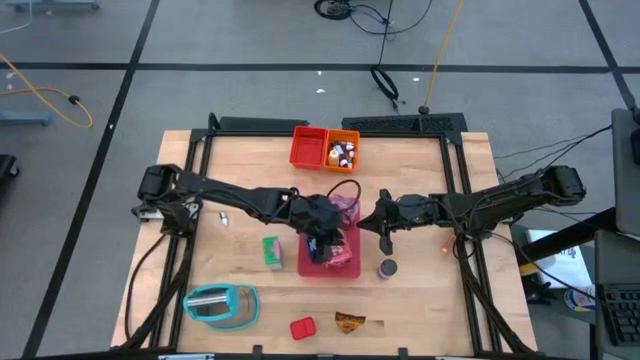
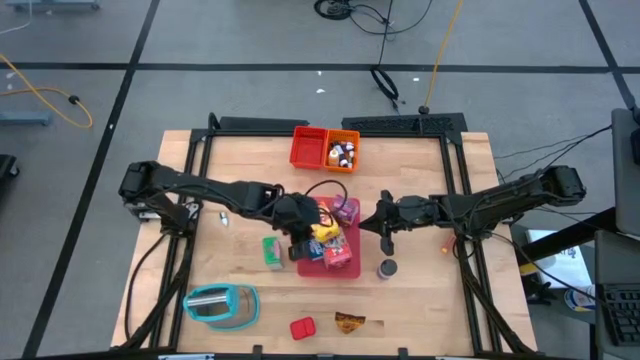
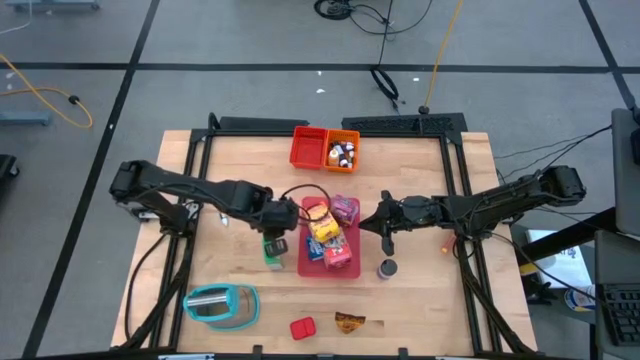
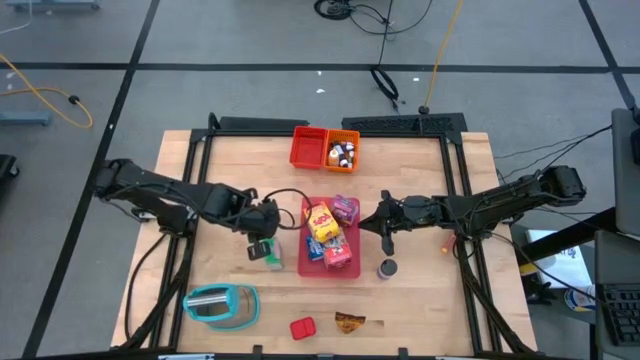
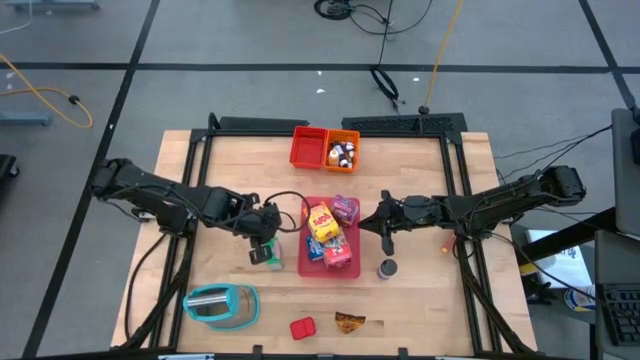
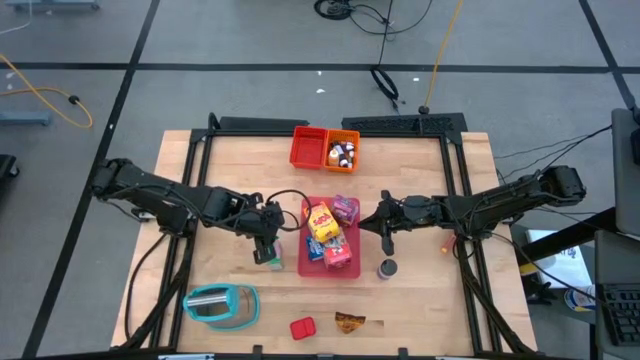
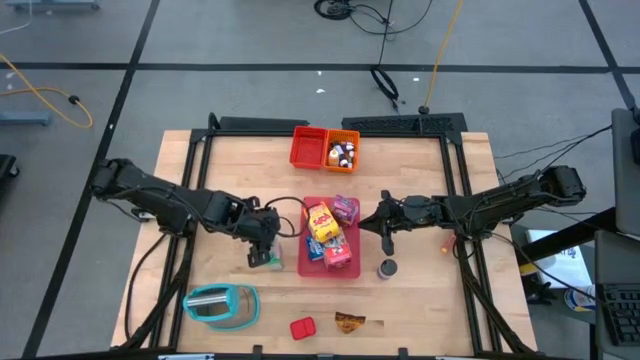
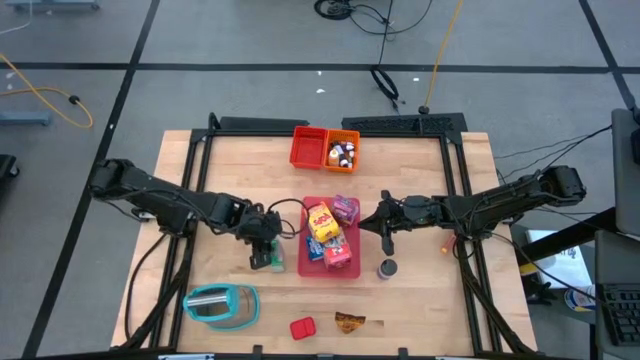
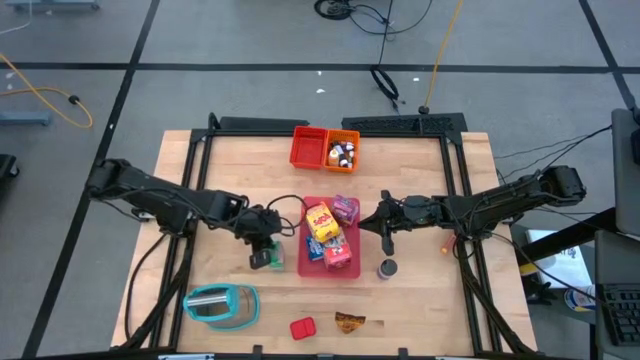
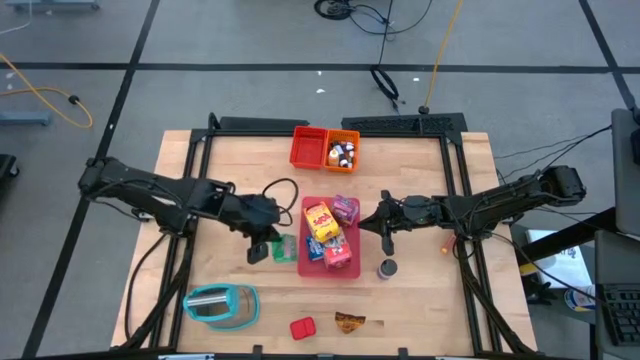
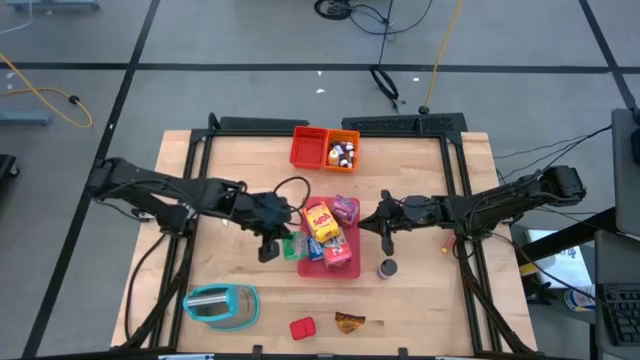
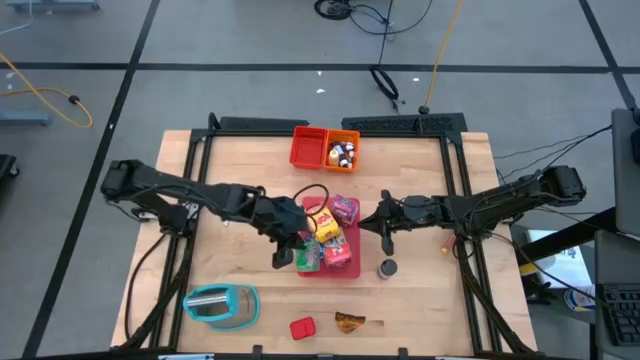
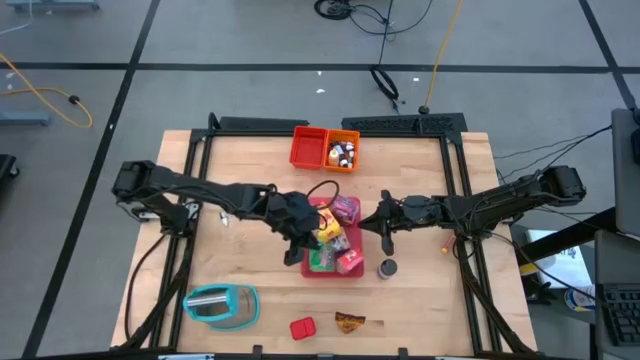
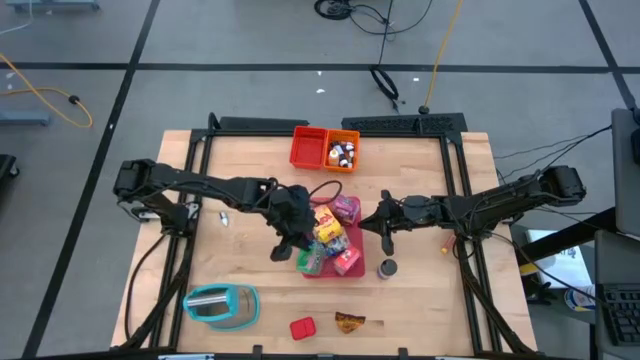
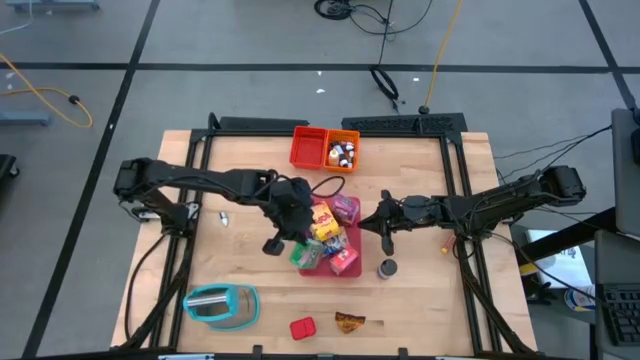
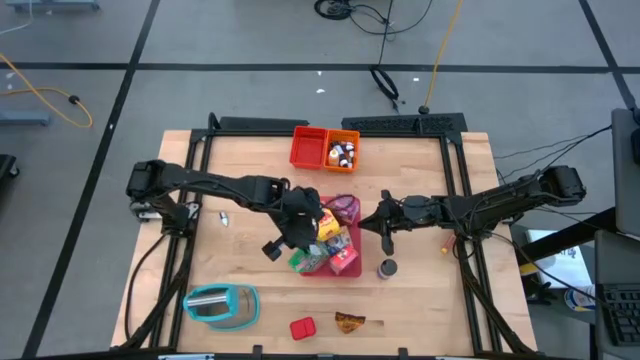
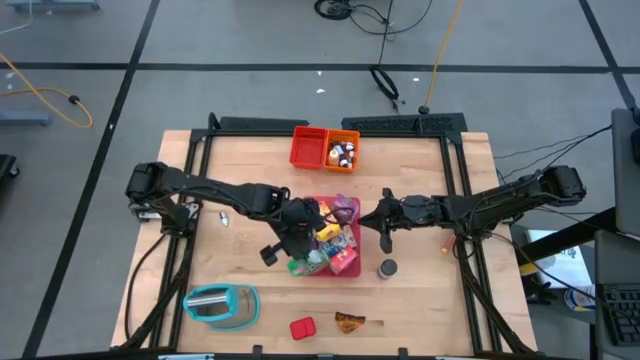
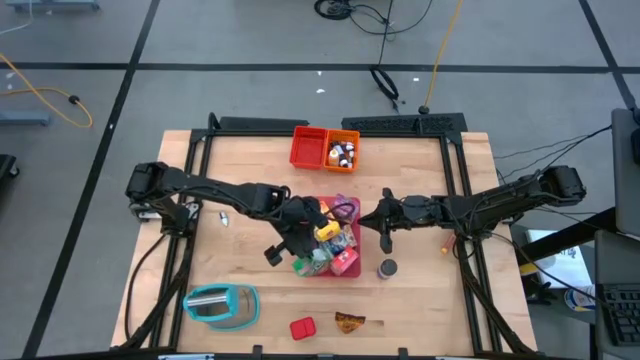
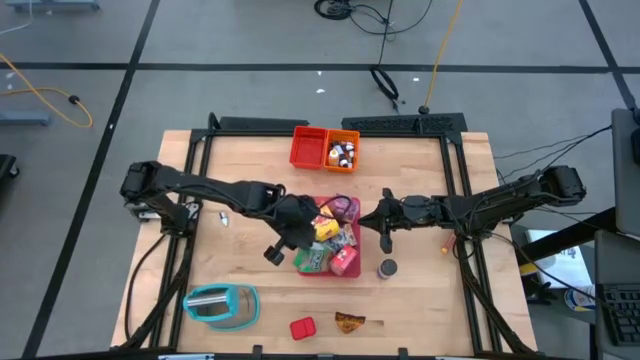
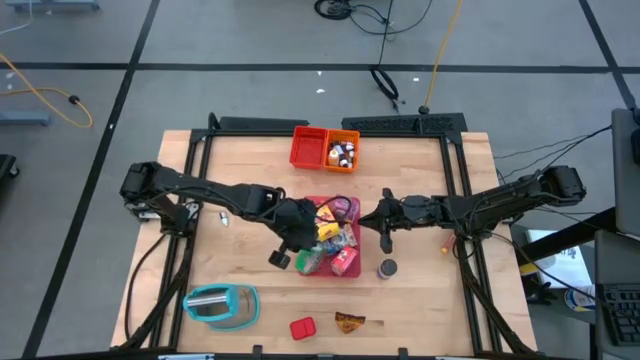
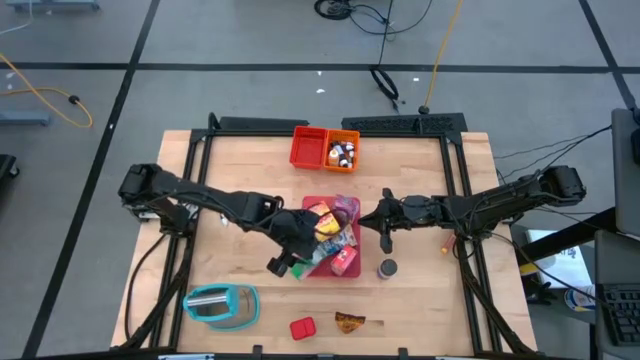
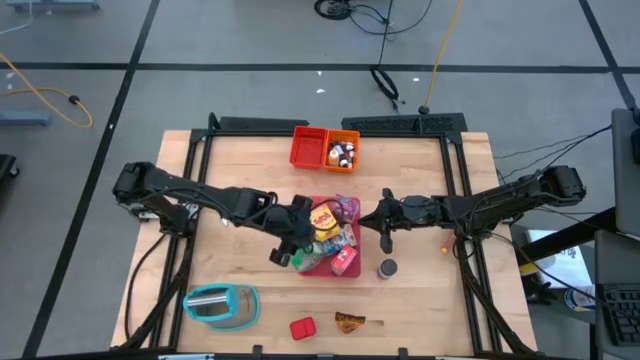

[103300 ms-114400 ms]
Task: Pick & Place Kitchen Items
Put the green cereal box into the light red bin

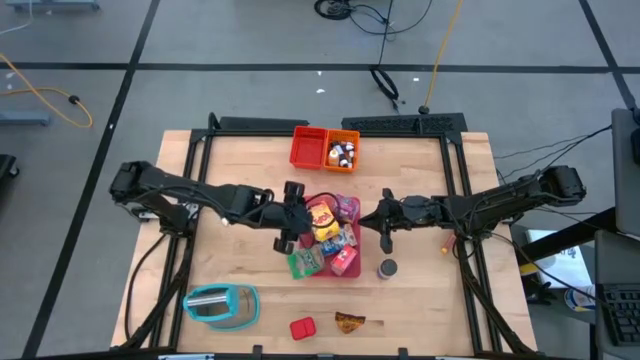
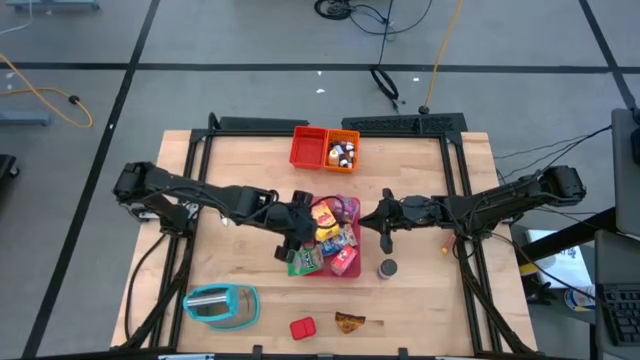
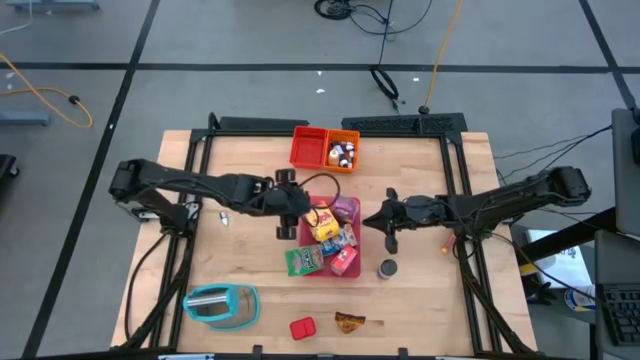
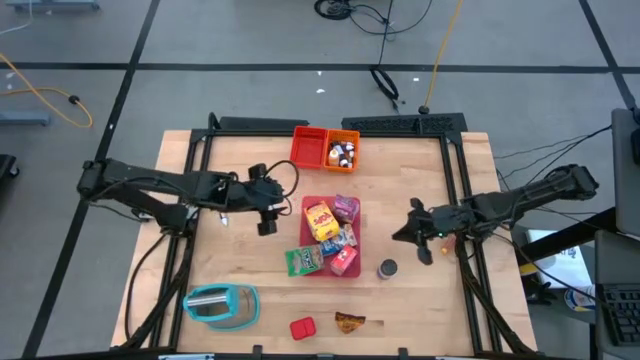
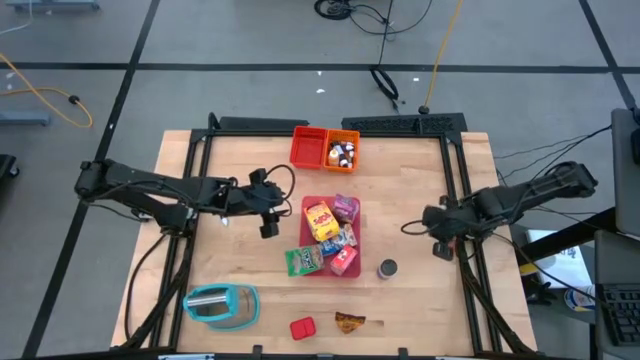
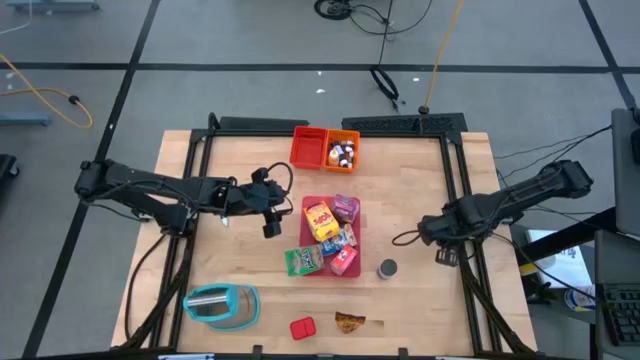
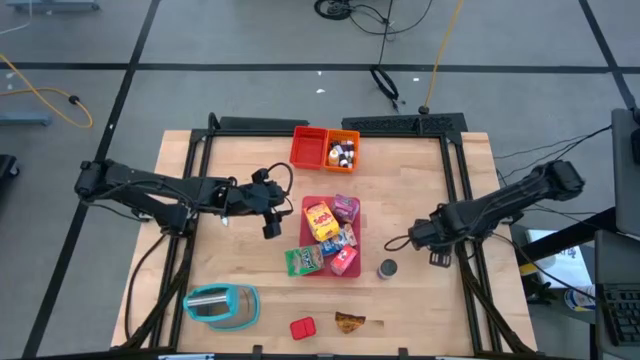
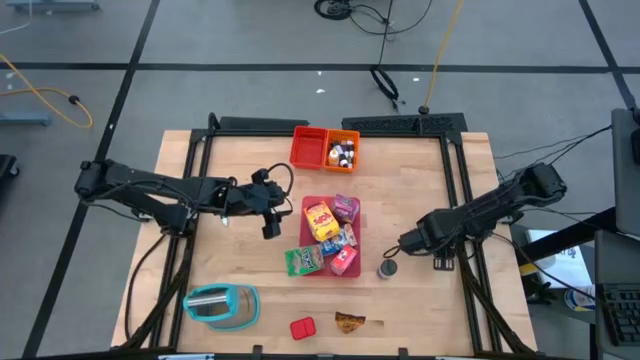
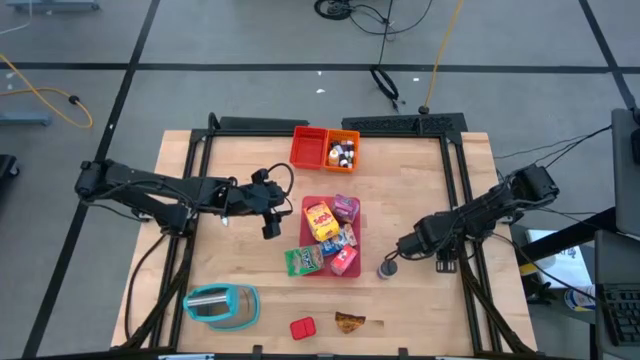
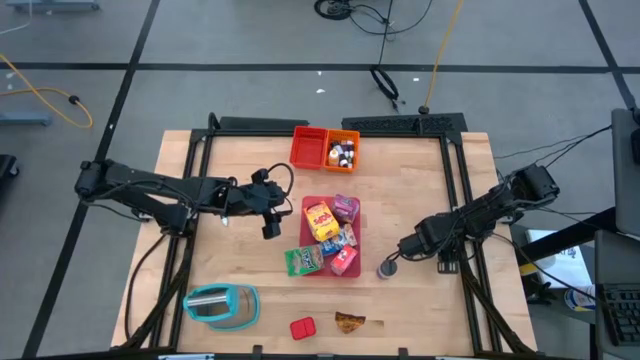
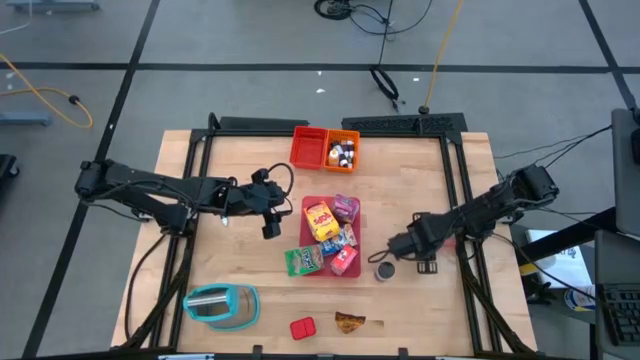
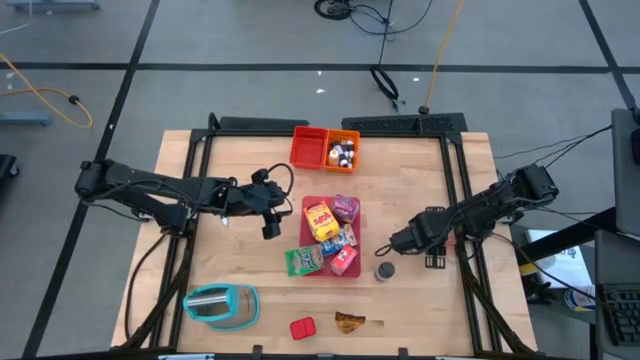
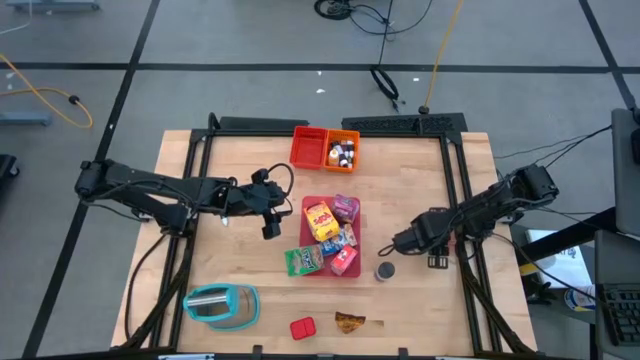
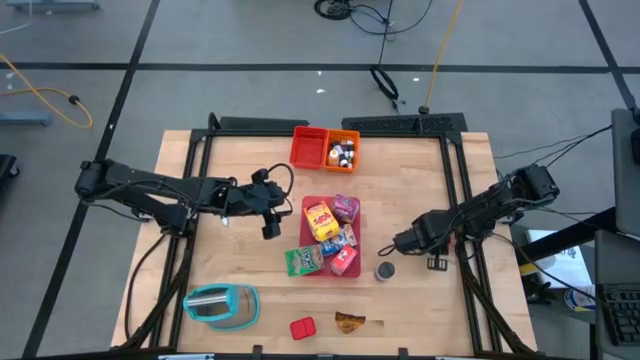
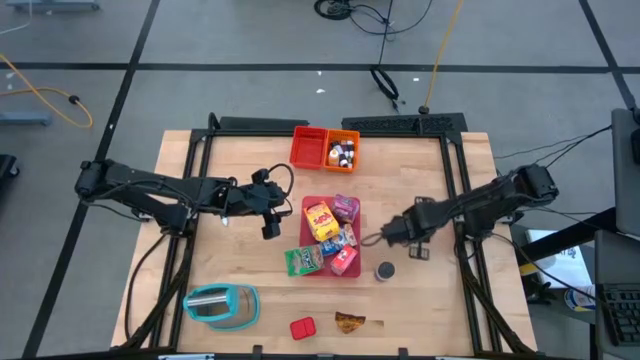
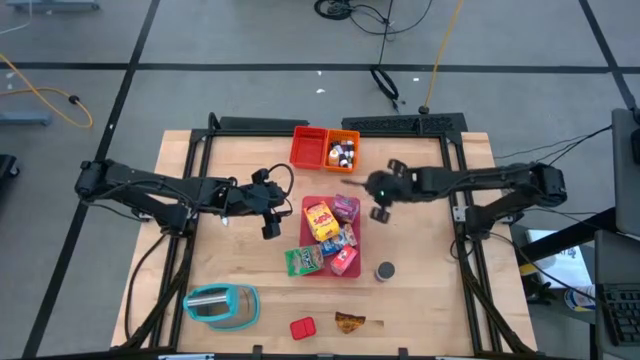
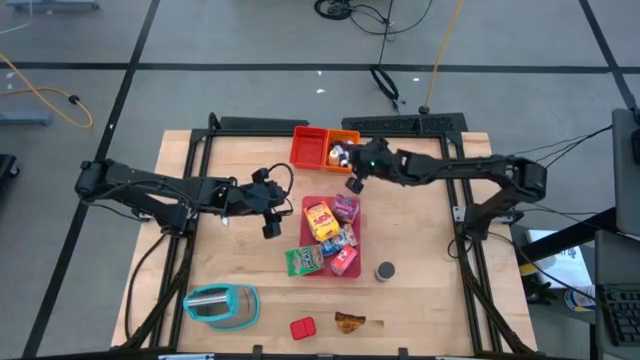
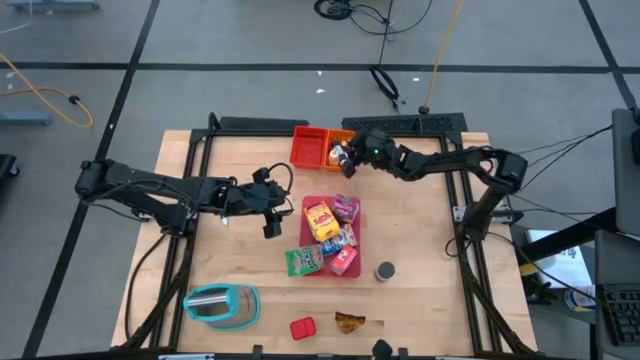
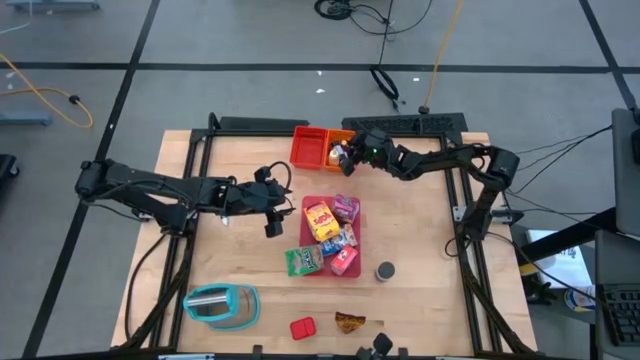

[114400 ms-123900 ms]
Put the large orange food coloring bottle into the orange basket

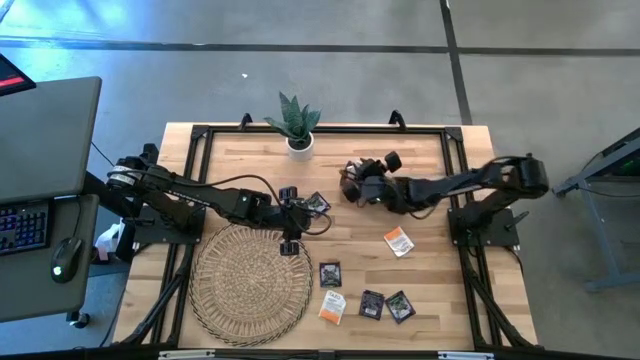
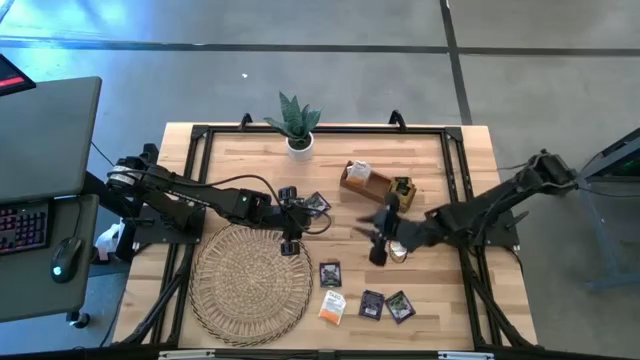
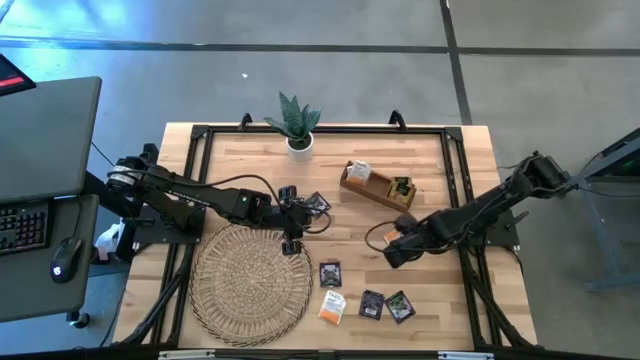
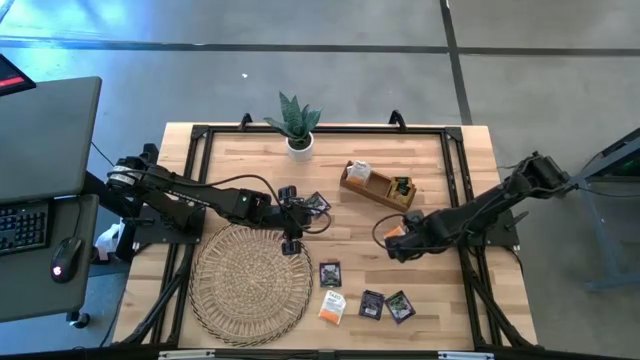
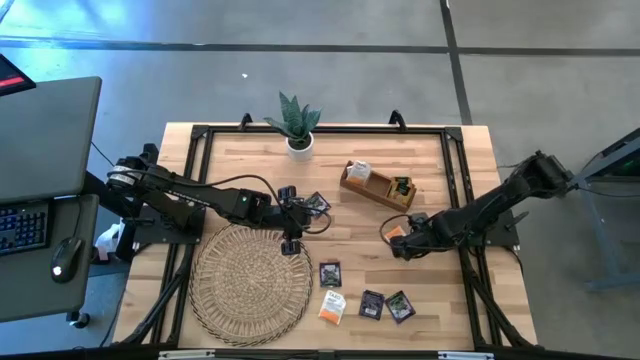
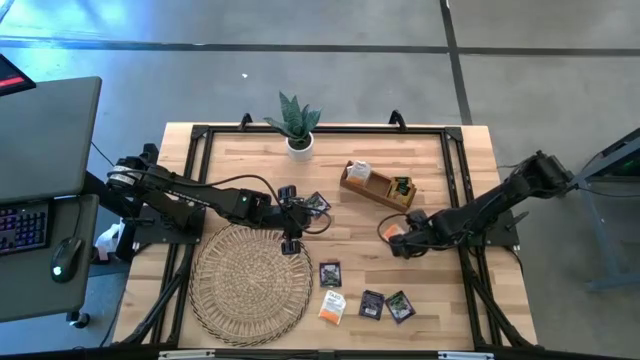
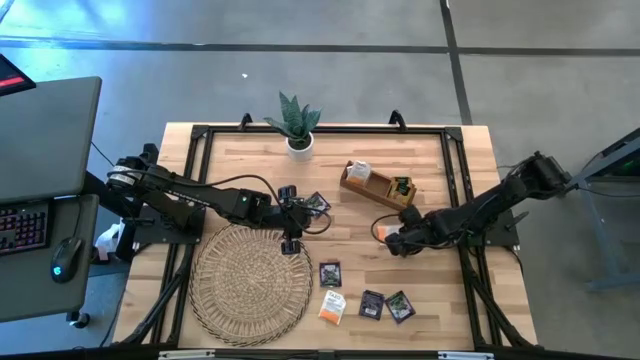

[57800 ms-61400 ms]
Task: Pick & Place Tea
Put the white tea bag into the left section of the wooden organizer
